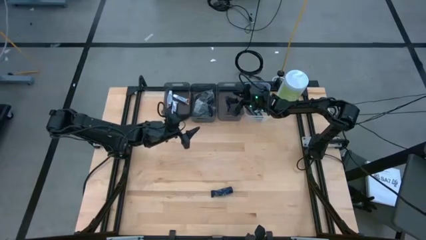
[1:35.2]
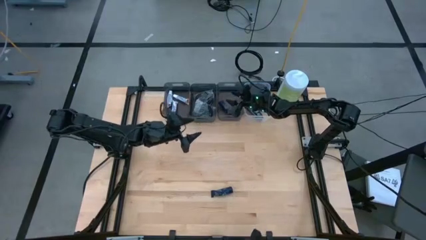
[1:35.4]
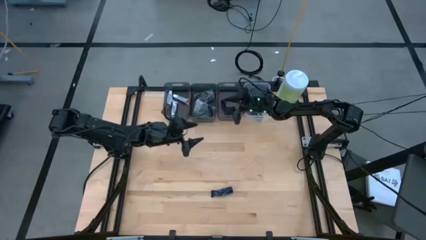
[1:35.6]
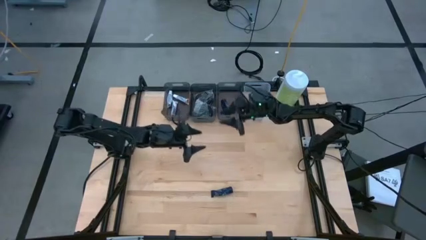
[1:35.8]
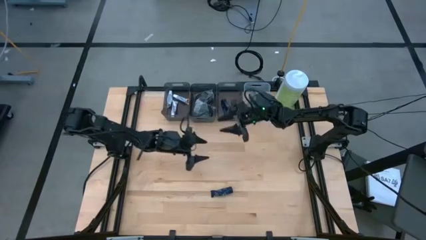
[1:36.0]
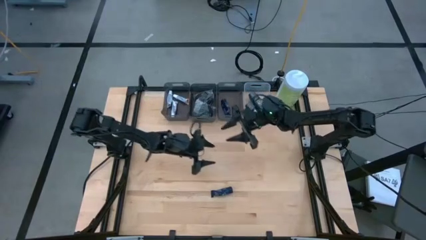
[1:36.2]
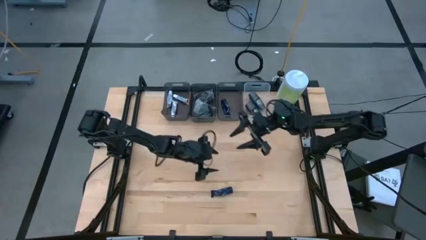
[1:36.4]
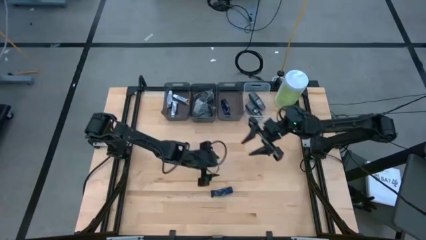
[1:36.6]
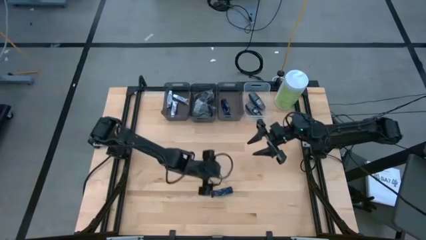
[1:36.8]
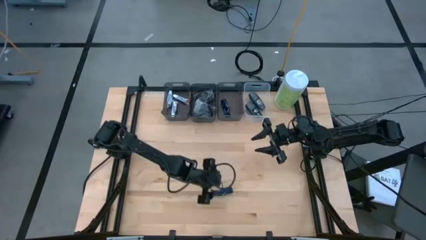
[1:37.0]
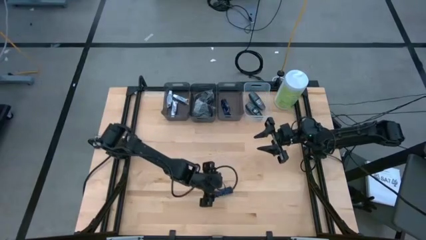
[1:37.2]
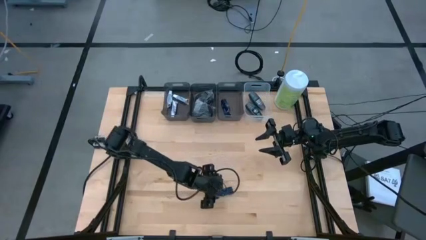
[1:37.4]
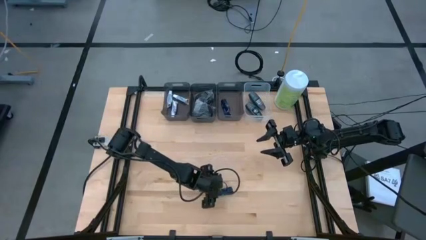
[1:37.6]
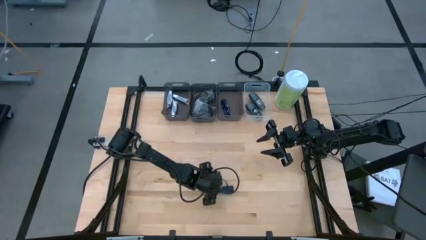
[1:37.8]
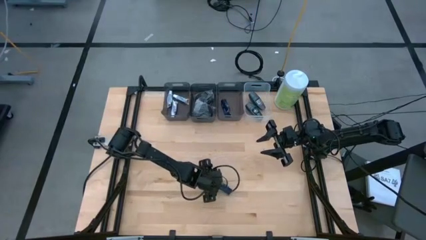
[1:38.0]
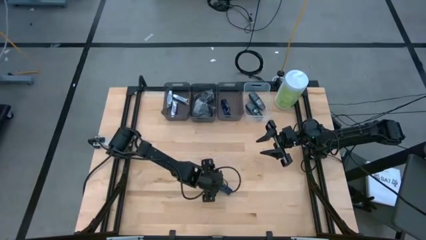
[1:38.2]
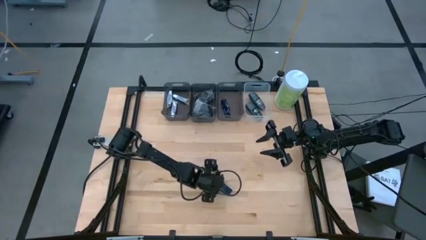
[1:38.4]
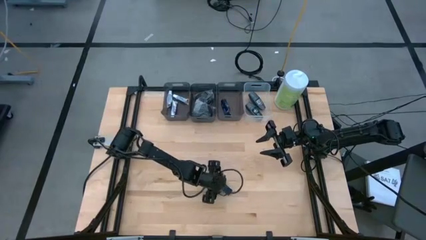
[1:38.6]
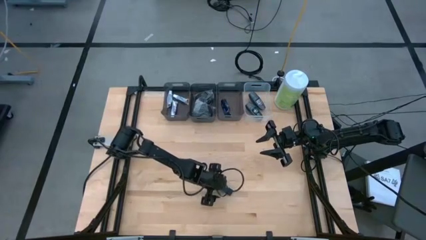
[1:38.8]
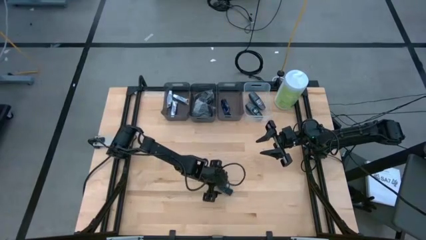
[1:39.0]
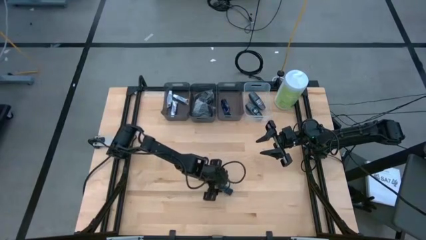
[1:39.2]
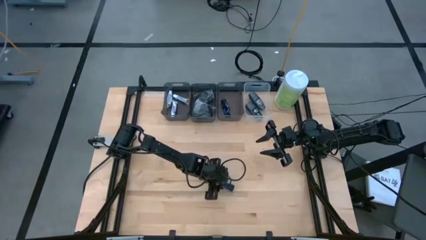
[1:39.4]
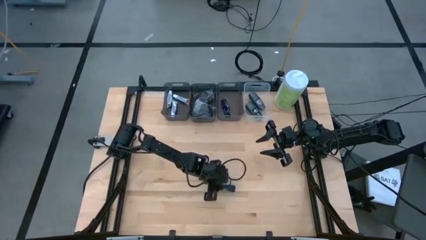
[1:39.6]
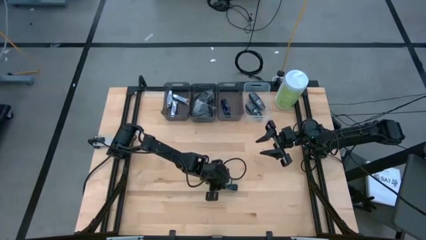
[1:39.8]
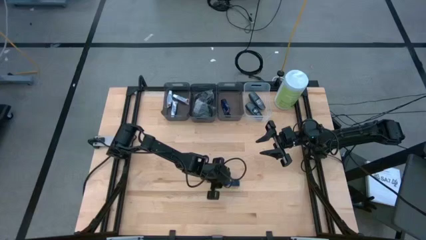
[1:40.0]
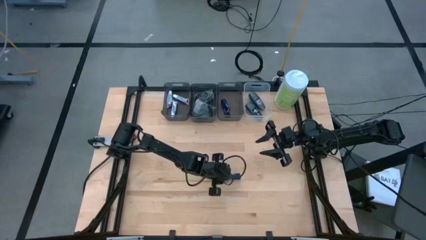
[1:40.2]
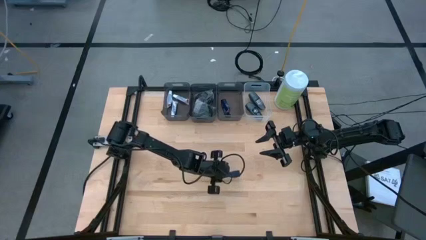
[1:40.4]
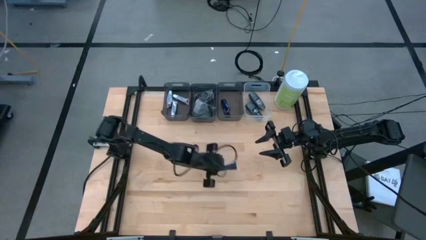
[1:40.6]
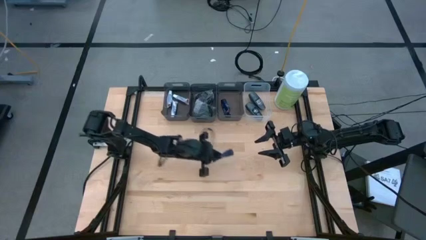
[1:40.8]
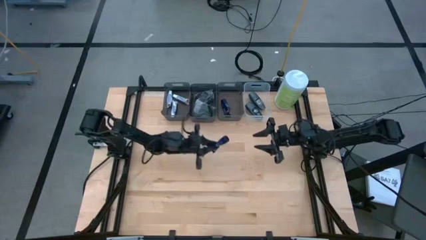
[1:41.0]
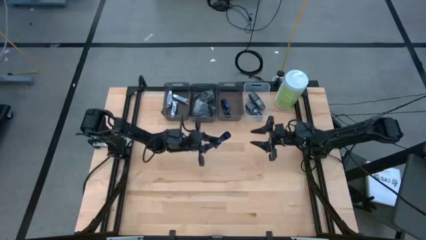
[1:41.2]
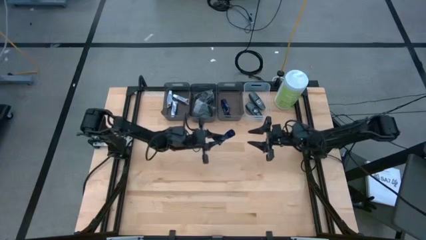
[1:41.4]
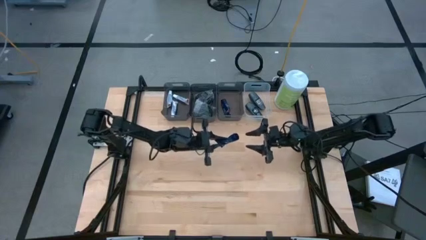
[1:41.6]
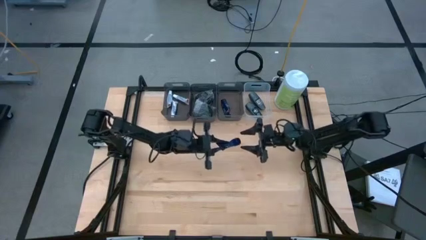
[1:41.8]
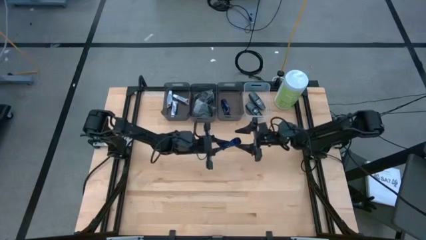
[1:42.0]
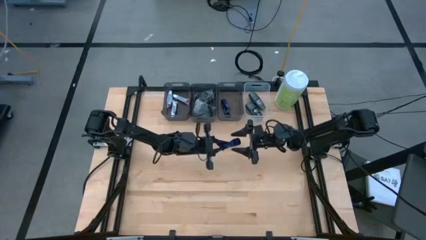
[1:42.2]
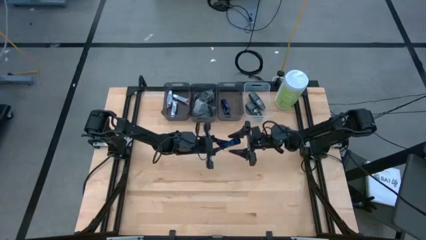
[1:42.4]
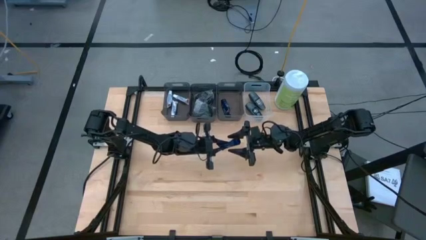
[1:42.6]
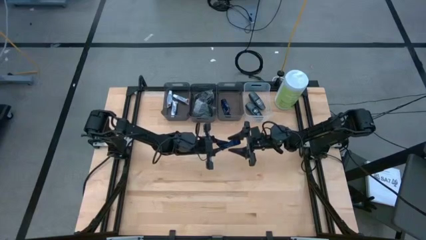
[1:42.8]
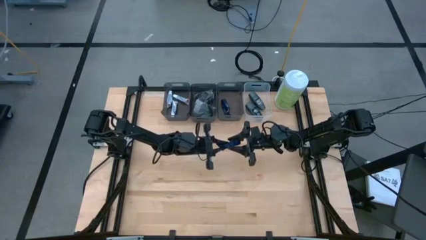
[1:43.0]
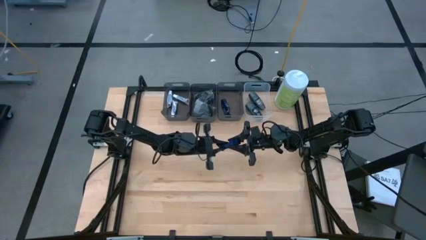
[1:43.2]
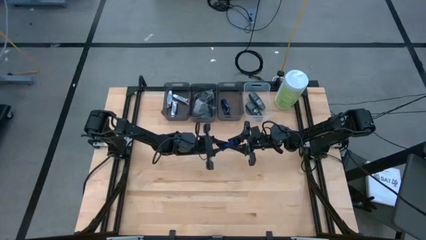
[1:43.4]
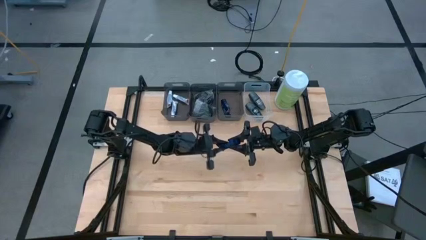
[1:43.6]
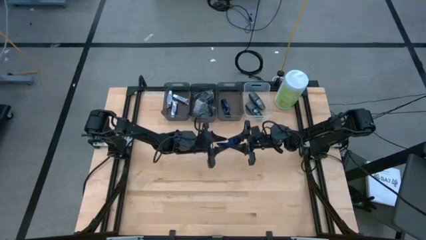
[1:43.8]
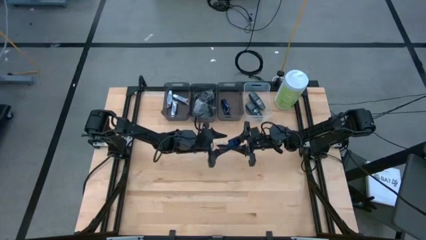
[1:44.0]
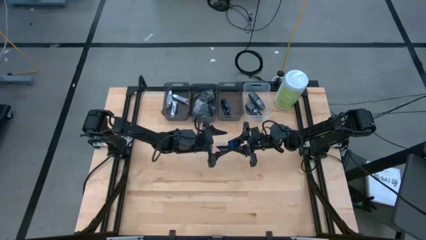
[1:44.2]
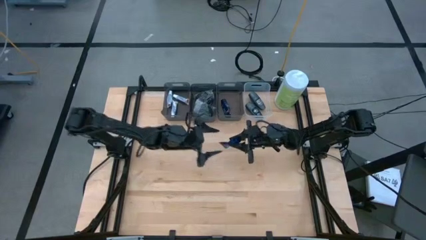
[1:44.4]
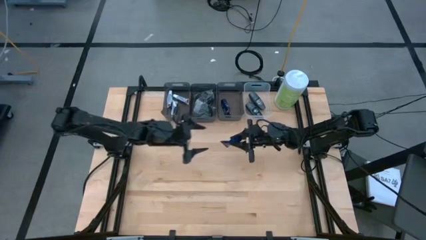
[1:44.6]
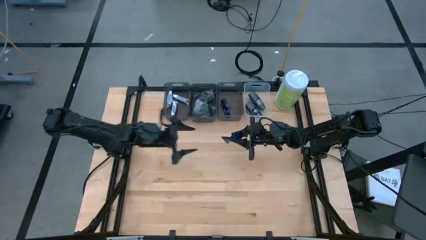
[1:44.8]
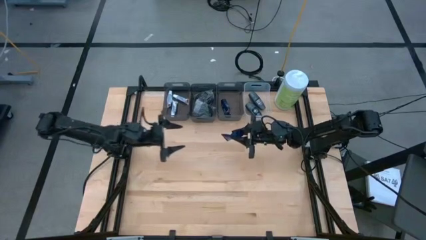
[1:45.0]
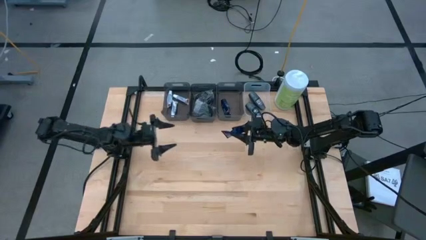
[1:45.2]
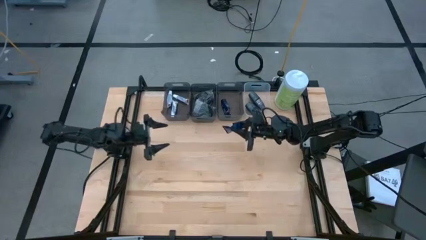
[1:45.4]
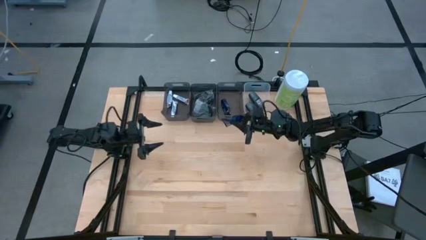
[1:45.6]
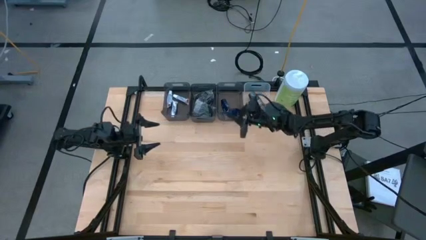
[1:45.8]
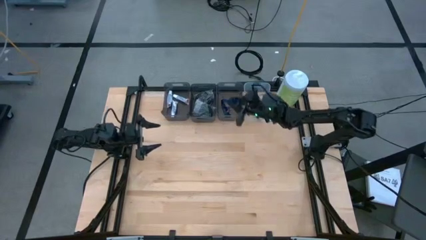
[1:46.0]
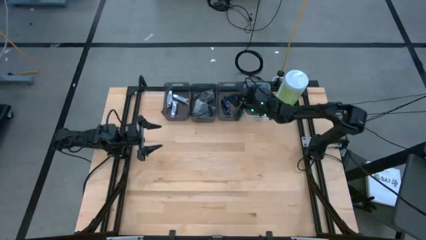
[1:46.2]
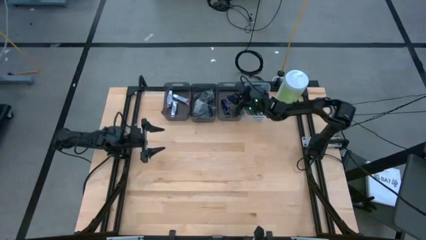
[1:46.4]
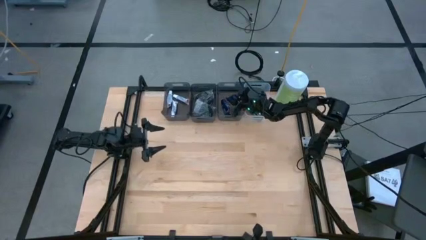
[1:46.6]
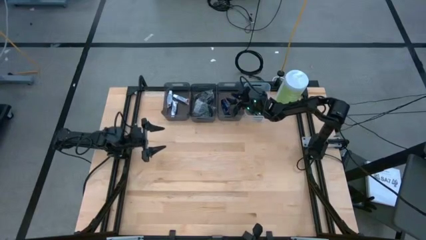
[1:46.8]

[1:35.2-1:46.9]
Task: Pick & Place Travel size toiletries
Put the shave cream into the right black bin

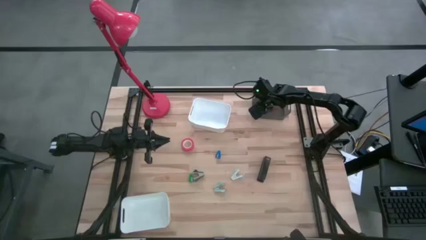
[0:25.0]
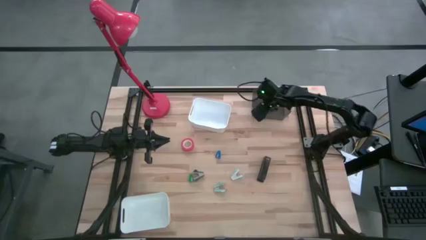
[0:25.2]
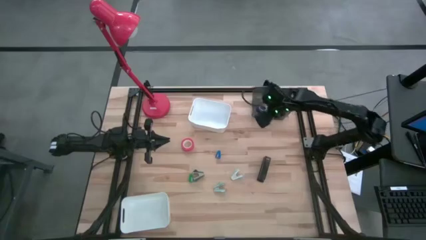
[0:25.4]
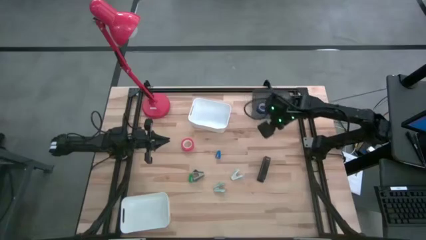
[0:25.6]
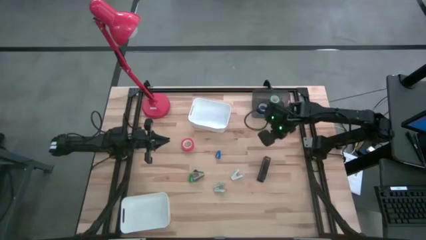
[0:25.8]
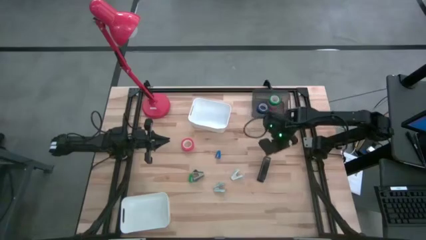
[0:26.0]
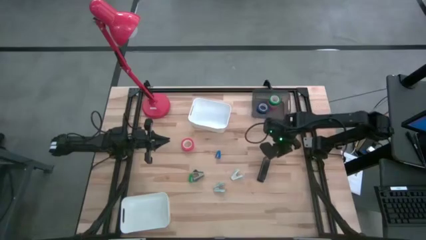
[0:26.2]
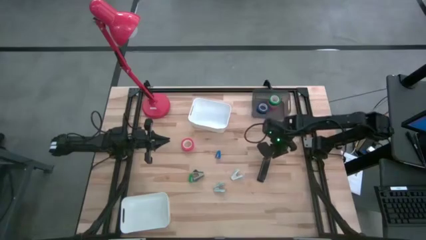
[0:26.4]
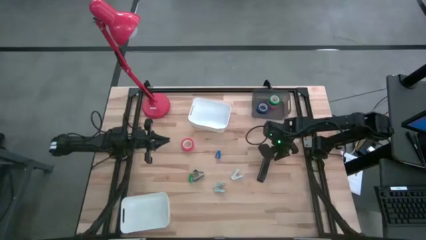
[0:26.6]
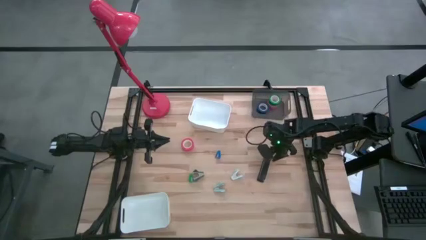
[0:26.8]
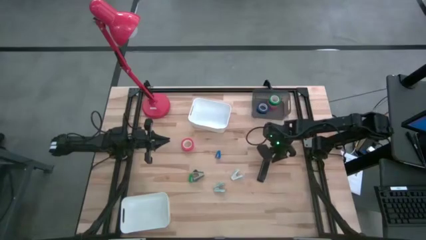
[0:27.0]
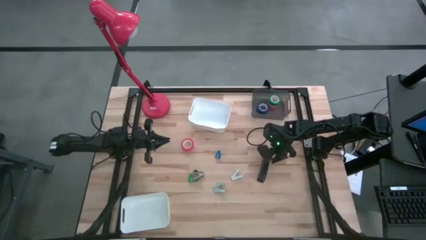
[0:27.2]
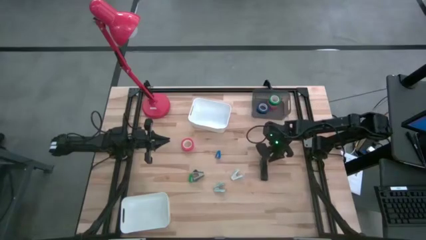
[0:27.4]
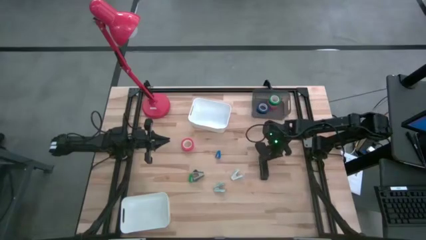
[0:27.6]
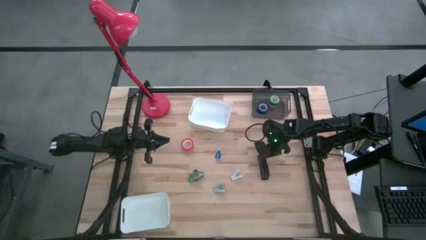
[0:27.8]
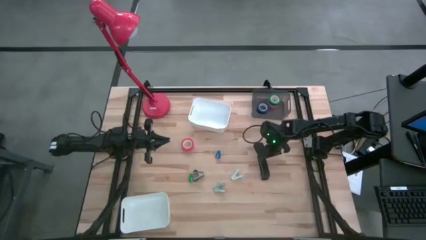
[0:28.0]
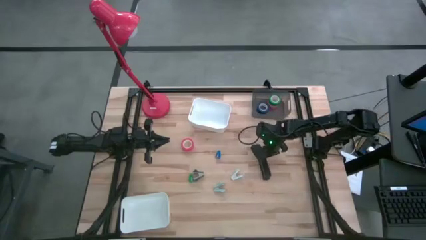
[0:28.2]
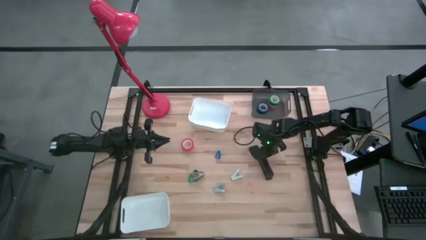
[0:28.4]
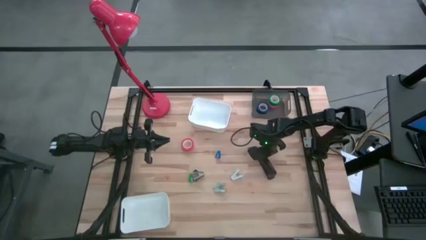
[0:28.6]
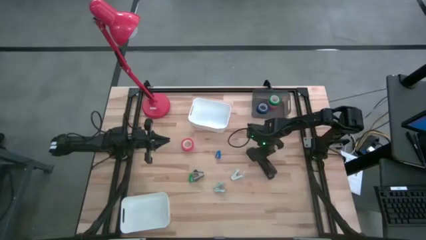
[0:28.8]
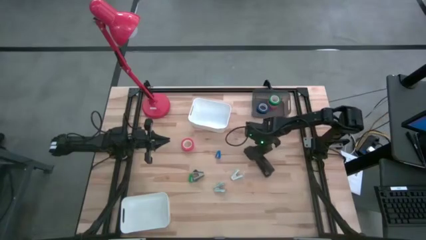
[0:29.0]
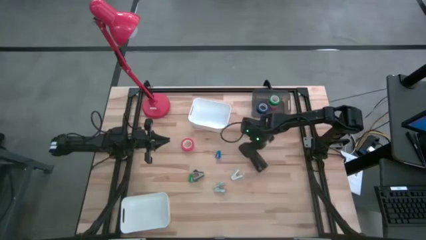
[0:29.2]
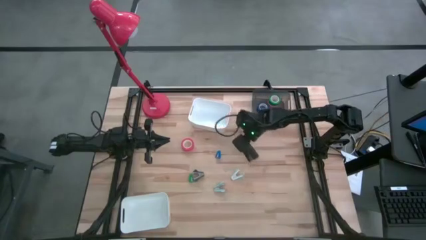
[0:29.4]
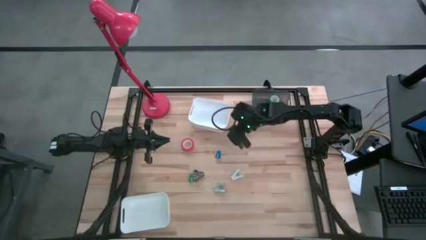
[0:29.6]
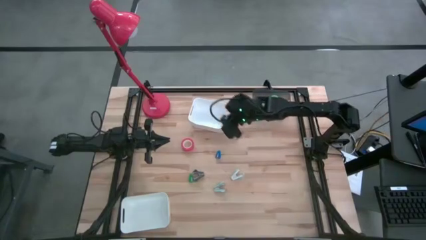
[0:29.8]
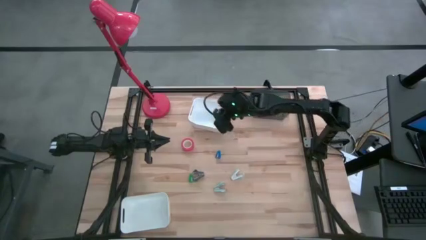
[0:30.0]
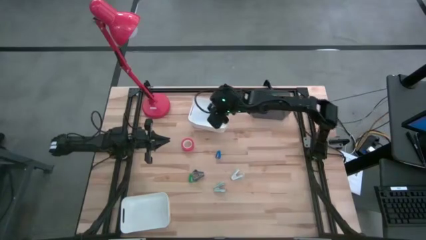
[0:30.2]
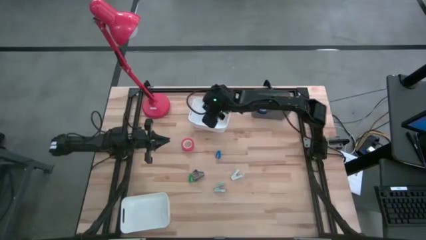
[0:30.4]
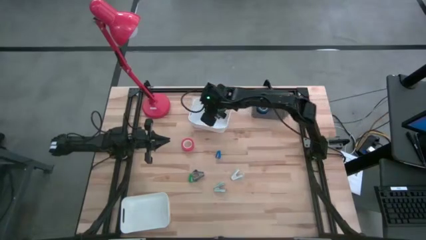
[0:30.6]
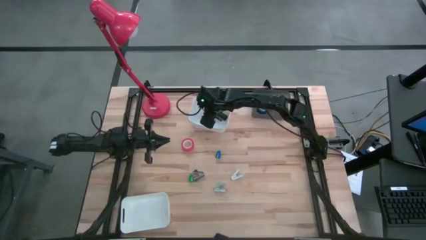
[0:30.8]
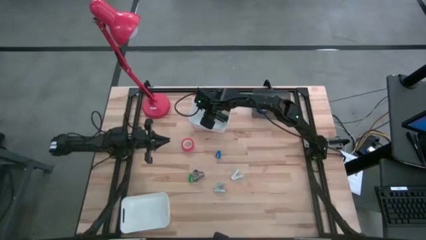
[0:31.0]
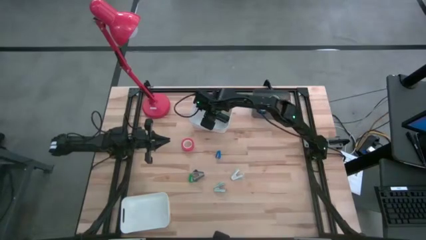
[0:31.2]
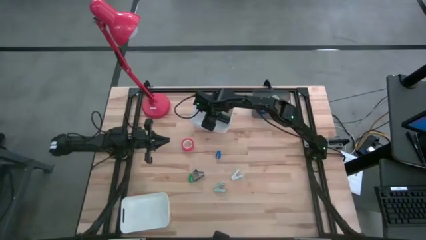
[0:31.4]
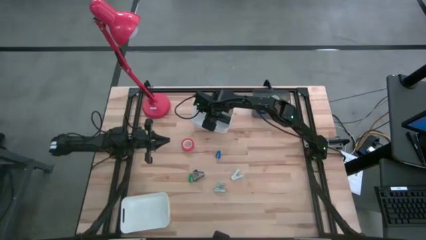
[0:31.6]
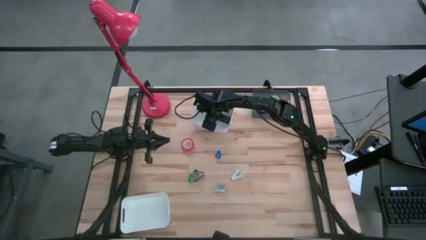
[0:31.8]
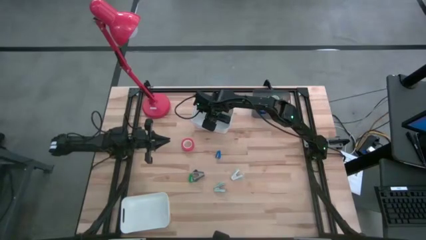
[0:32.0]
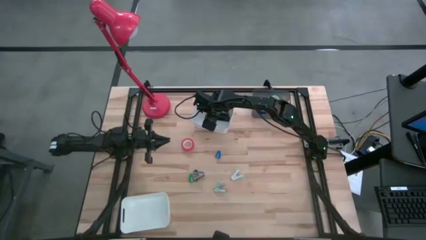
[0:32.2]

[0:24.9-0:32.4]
Task: Pick and place Stapler, Stapler remover, tape
Put the black stapler into the top white bin
